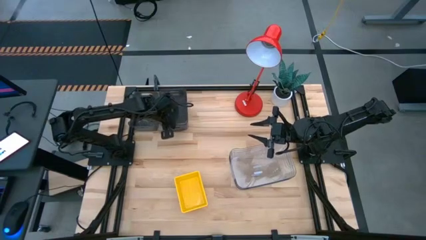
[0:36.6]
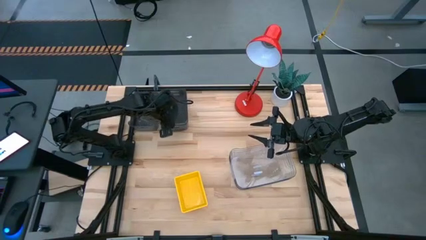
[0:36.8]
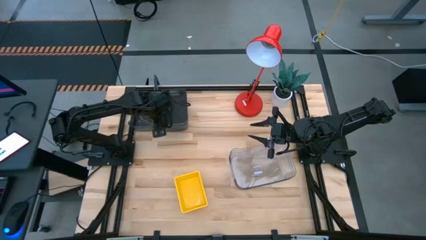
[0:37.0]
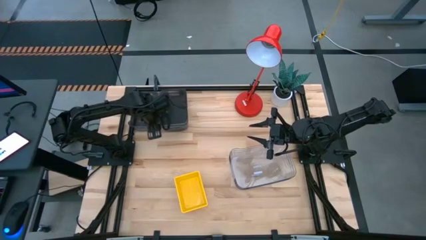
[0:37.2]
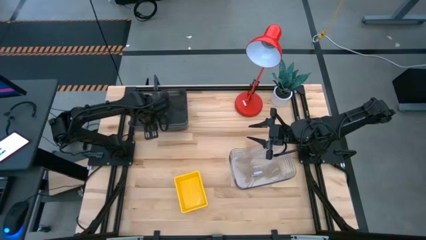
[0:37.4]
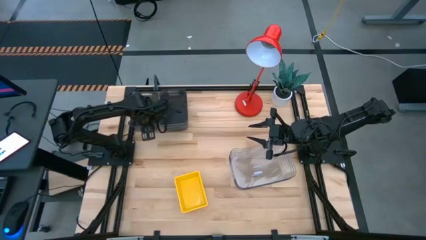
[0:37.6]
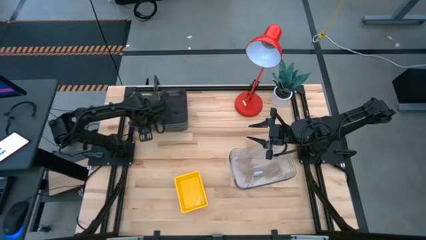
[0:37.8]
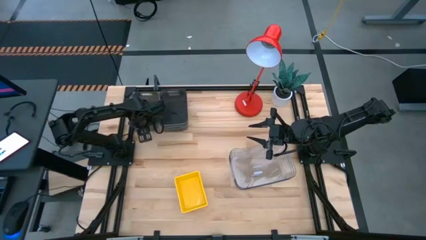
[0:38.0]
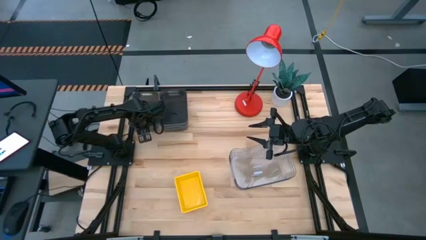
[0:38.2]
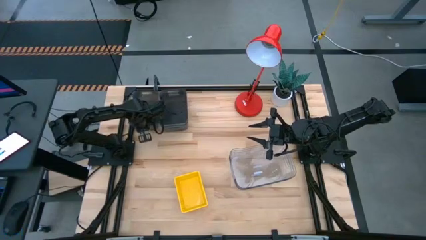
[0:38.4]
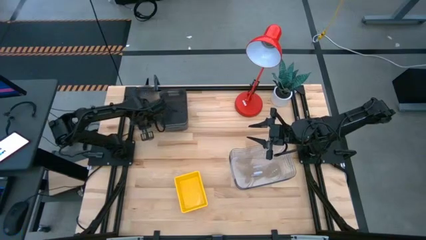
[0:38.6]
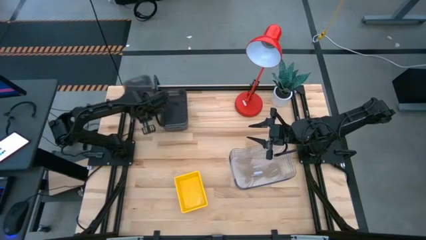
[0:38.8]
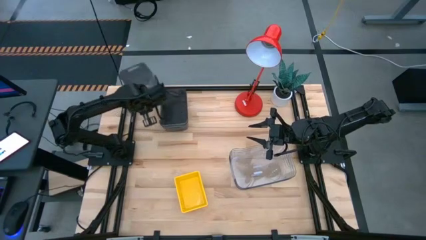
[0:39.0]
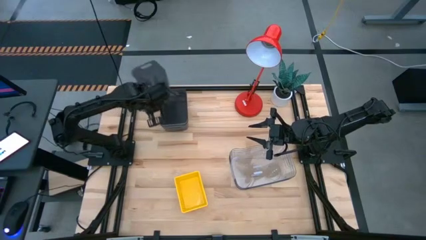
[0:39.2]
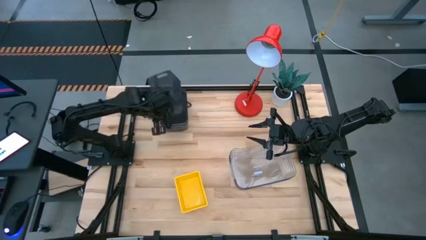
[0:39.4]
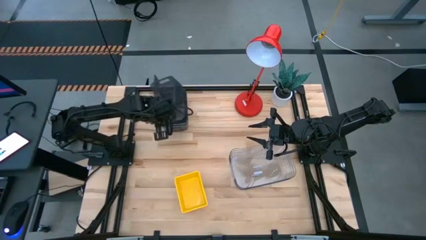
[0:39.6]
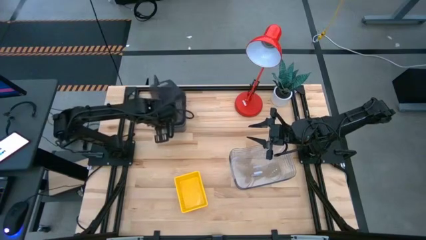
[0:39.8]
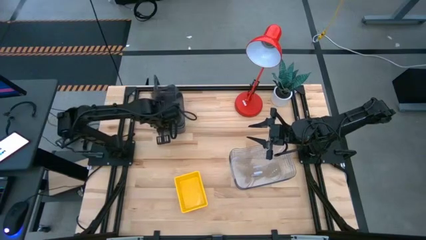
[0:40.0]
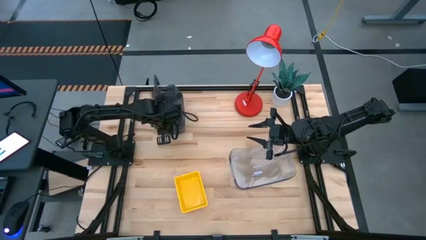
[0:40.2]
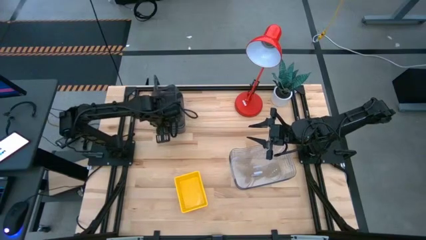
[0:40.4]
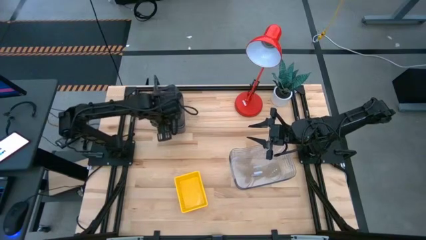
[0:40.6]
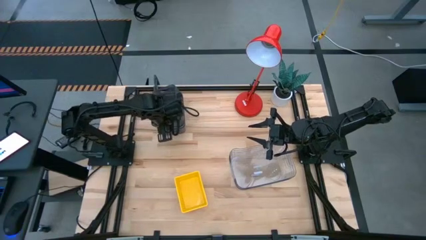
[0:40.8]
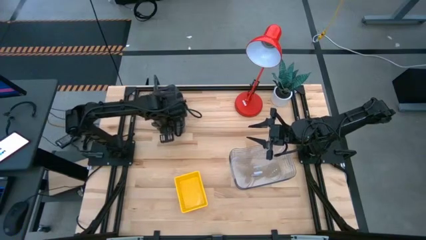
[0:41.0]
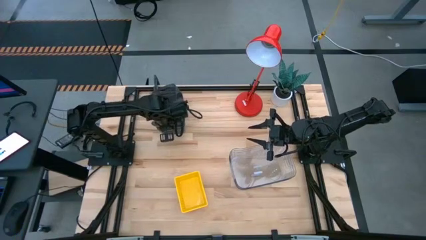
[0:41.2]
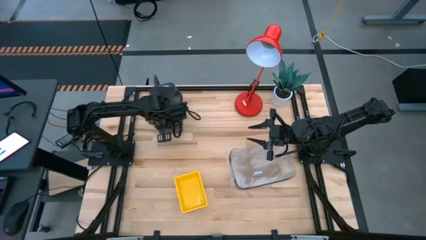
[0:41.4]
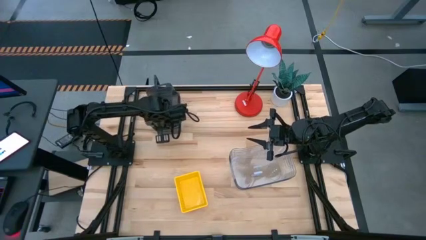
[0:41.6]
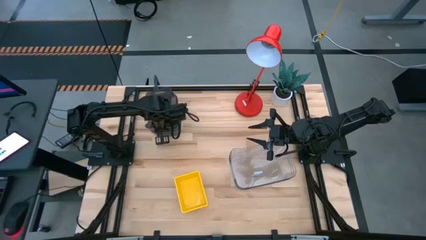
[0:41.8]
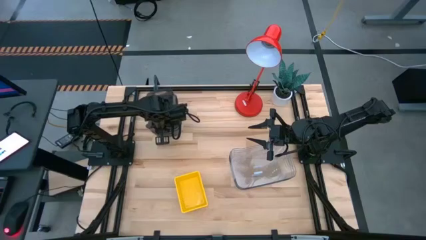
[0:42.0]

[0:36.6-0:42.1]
Stack the left black bin on top of the right black bin

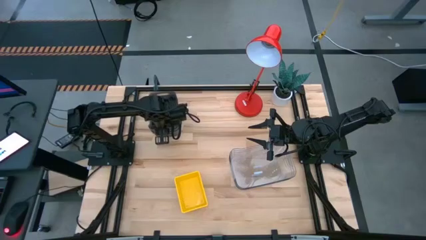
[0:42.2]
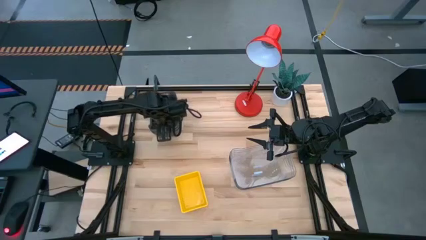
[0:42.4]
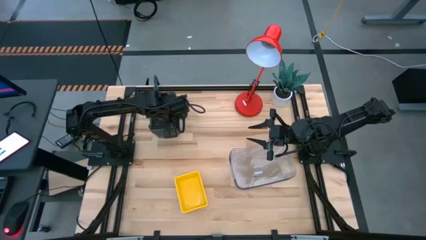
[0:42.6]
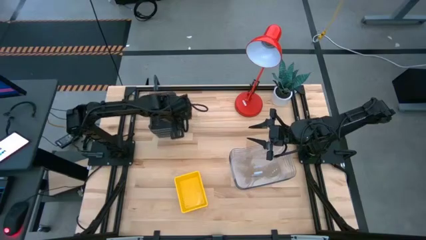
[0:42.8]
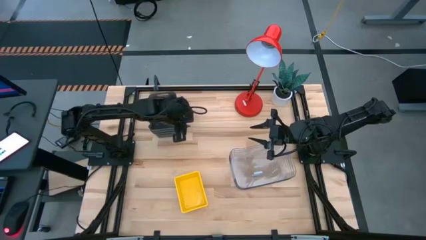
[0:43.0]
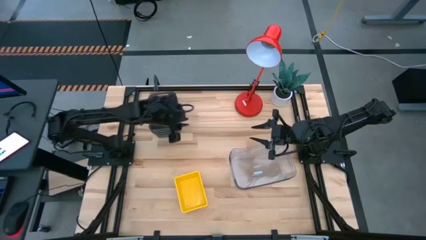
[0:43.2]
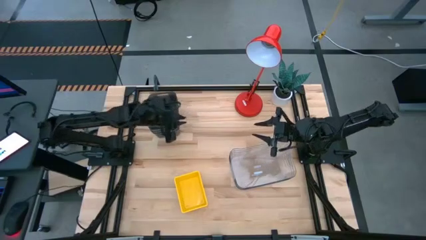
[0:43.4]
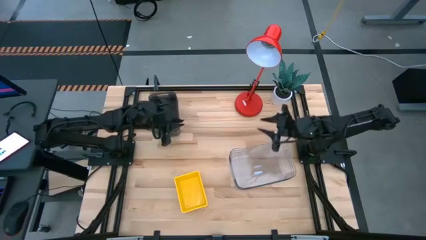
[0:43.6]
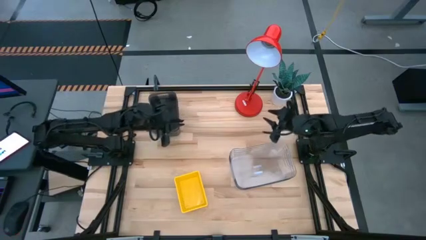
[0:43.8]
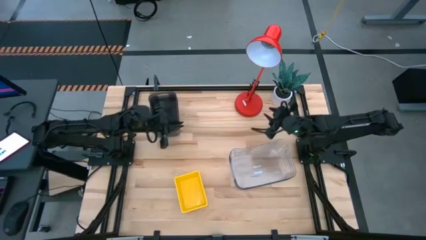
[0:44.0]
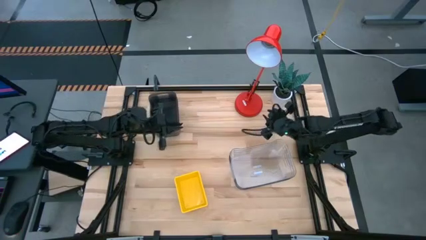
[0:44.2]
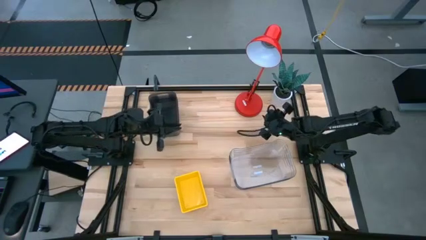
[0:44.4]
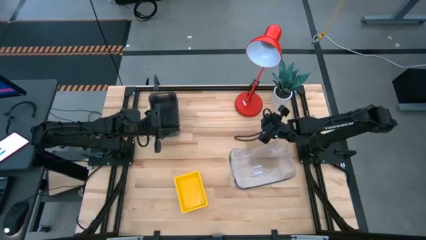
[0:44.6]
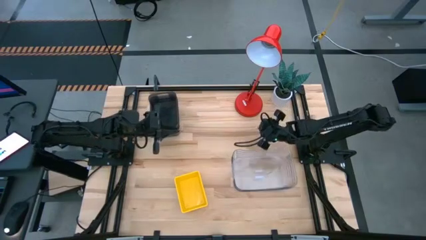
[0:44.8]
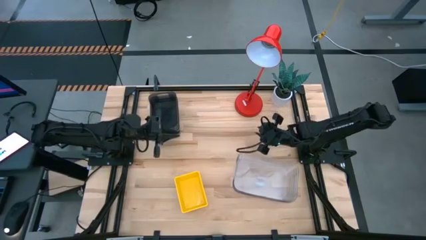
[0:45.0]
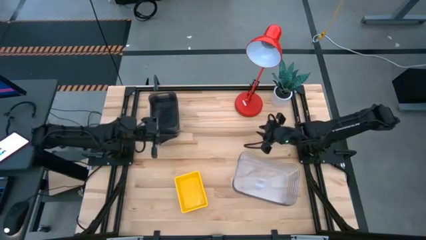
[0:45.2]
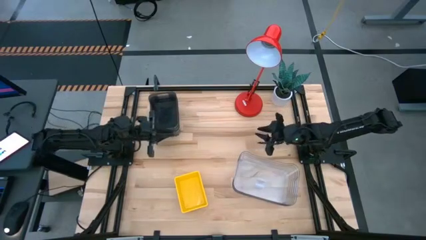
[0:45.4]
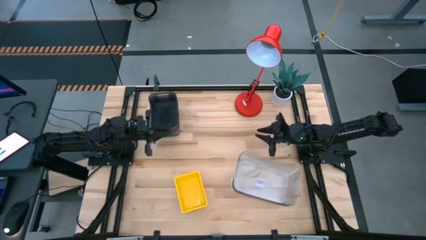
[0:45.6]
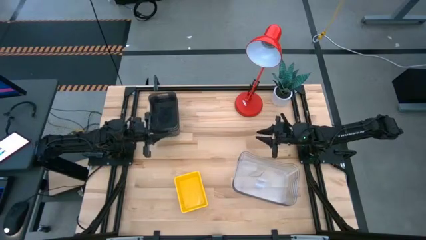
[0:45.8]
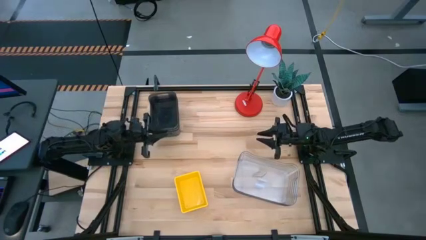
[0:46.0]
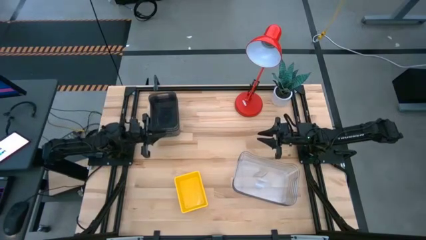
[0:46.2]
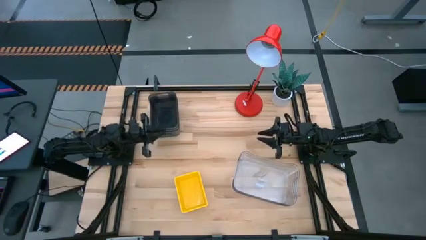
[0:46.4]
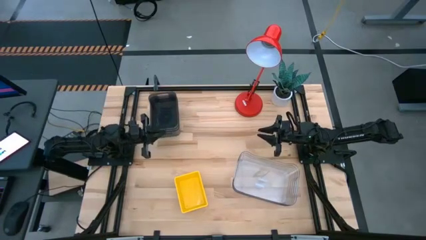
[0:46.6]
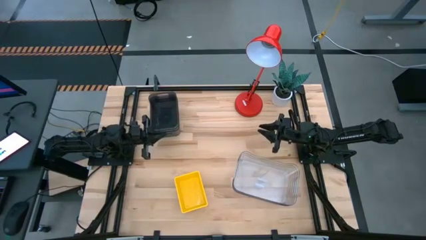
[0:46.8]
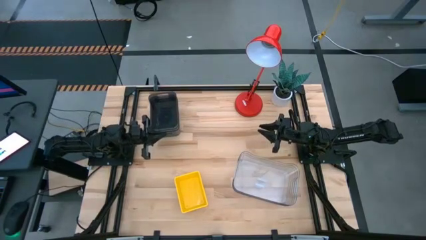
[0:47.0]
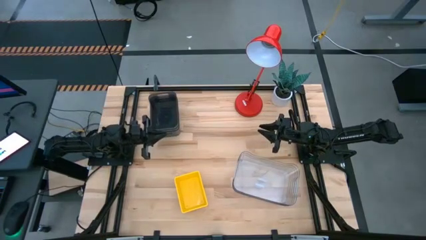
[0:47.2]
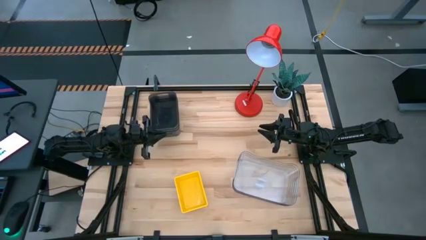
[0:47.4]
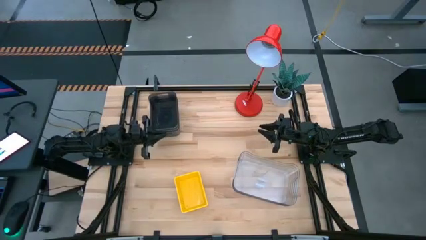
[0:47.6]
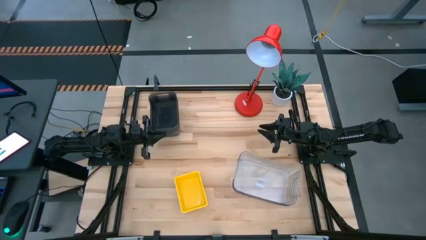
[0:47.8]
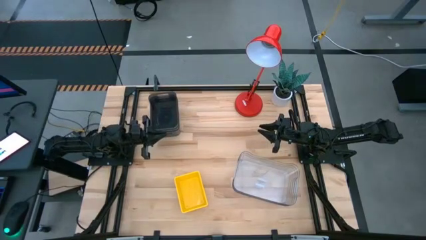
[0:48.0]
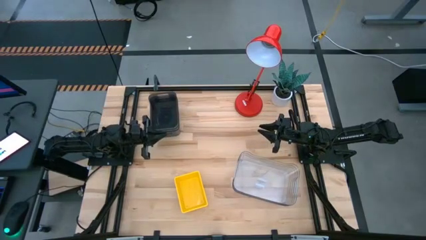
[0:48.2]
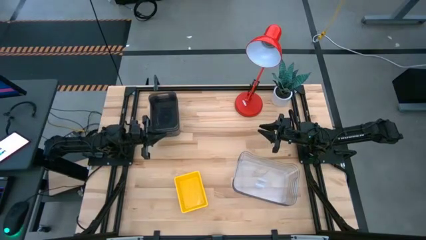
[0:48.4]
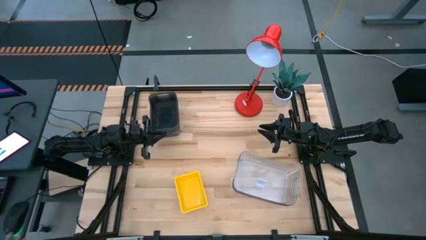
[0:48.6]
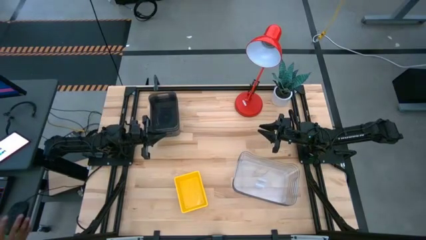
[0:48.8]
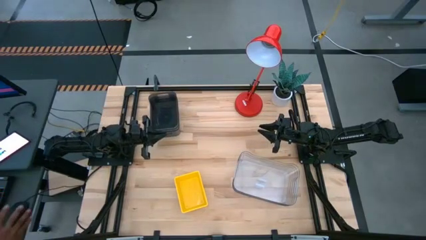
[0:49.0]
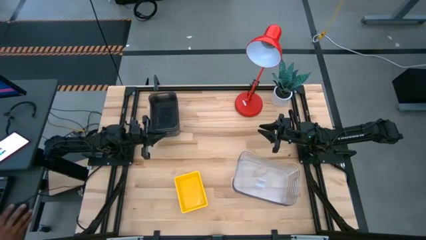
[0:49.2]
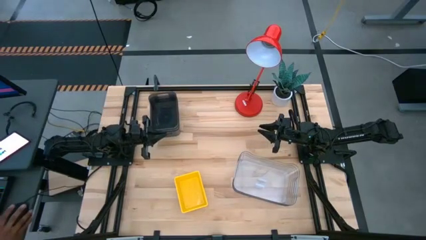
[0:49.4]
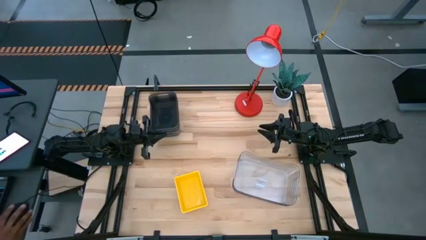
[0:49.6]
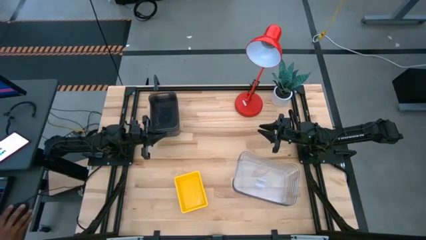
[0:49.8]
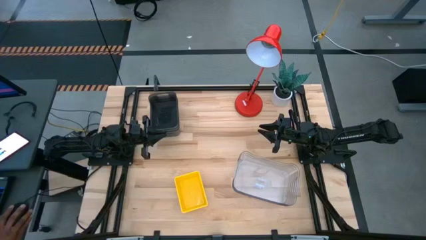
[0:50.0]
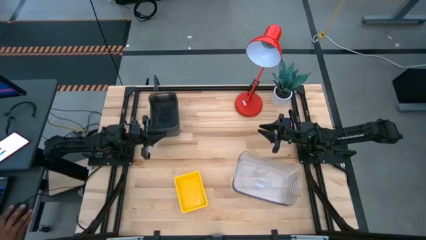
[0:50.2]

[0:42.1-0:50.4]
Return to Home Position
